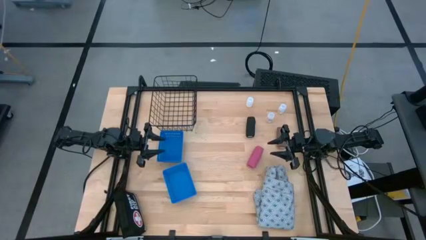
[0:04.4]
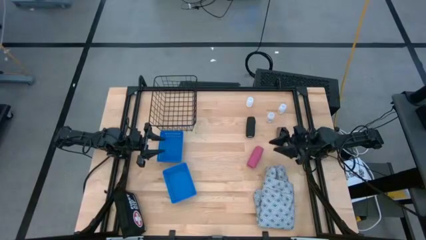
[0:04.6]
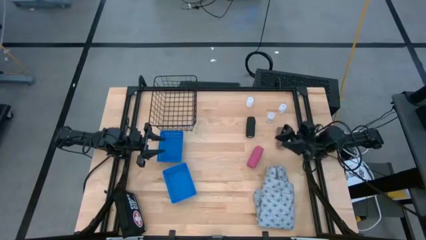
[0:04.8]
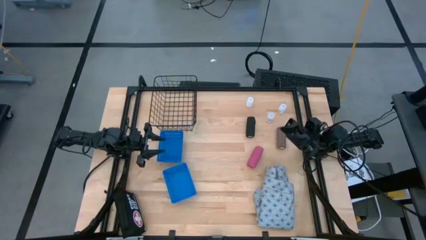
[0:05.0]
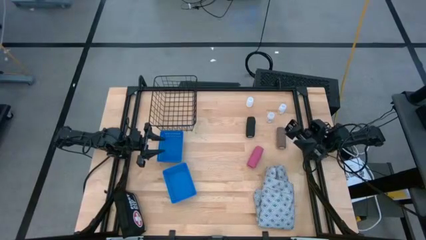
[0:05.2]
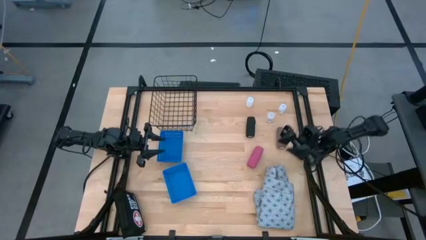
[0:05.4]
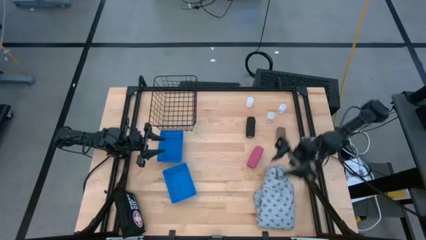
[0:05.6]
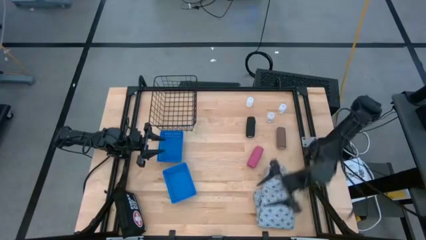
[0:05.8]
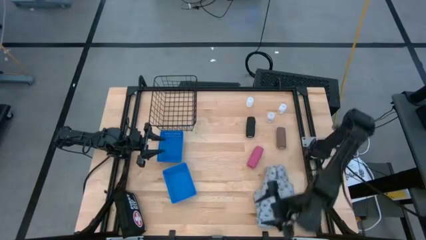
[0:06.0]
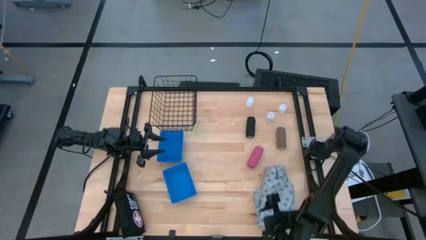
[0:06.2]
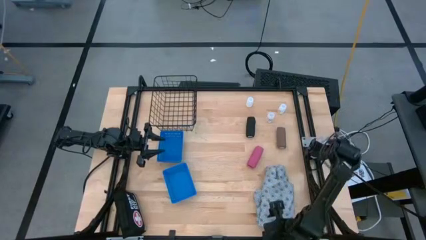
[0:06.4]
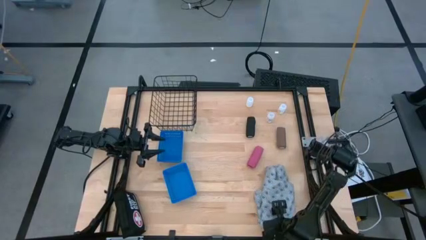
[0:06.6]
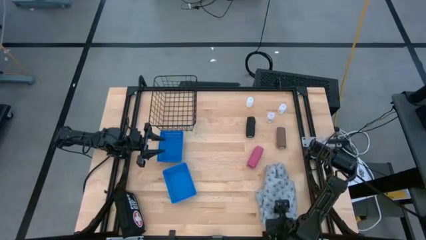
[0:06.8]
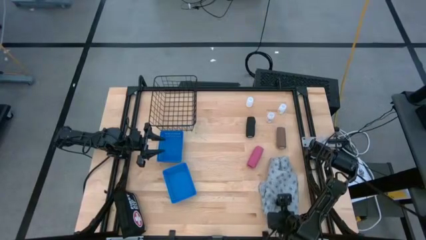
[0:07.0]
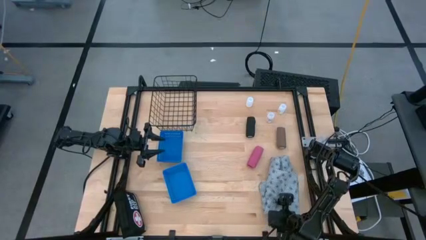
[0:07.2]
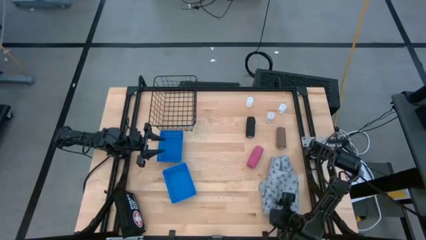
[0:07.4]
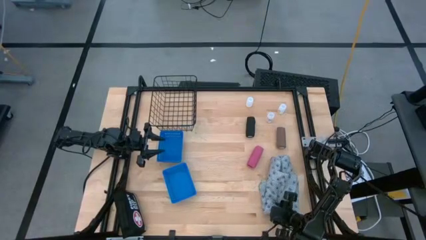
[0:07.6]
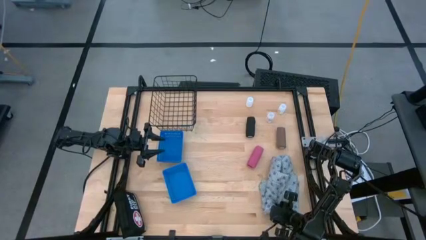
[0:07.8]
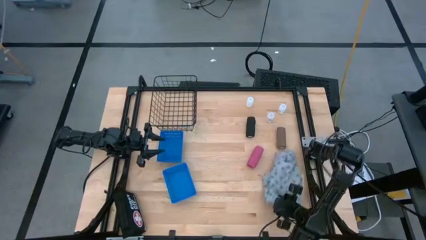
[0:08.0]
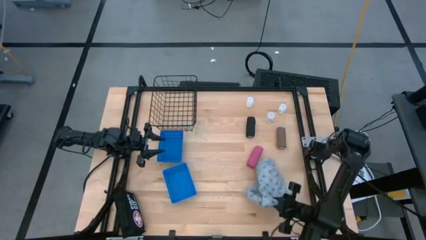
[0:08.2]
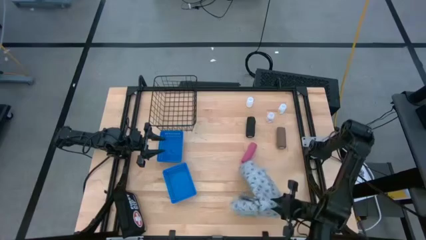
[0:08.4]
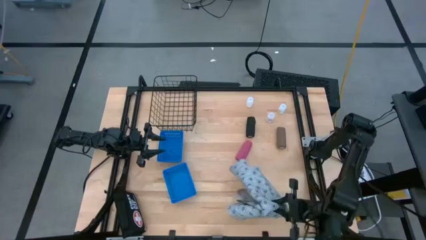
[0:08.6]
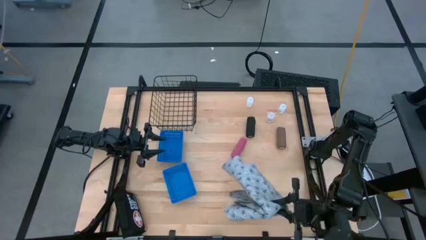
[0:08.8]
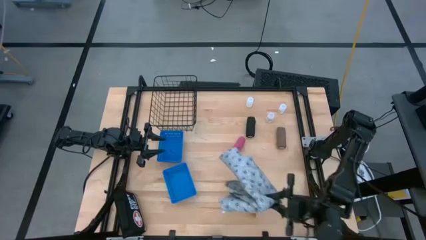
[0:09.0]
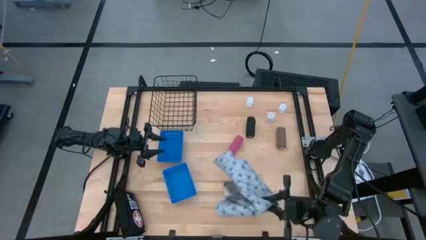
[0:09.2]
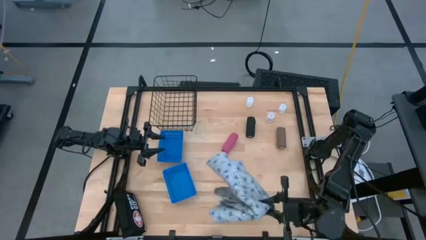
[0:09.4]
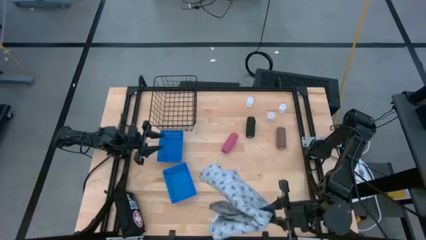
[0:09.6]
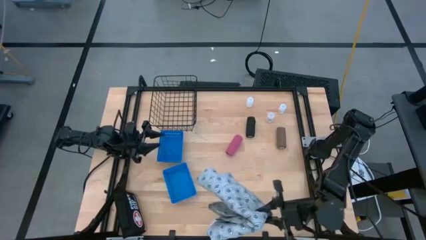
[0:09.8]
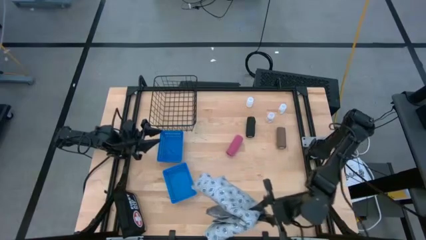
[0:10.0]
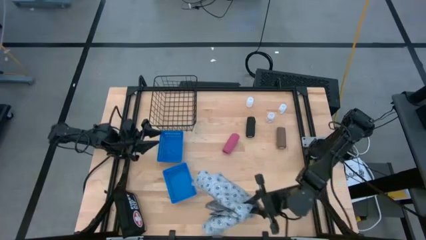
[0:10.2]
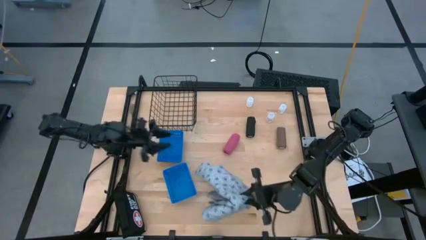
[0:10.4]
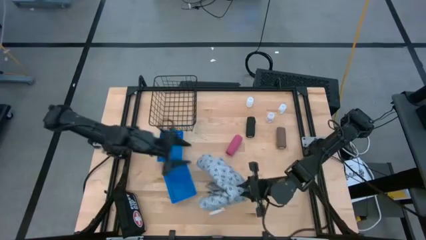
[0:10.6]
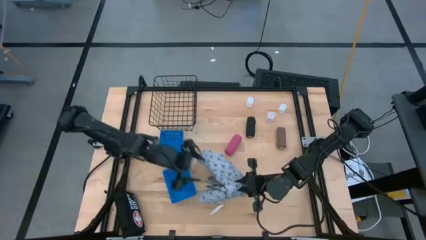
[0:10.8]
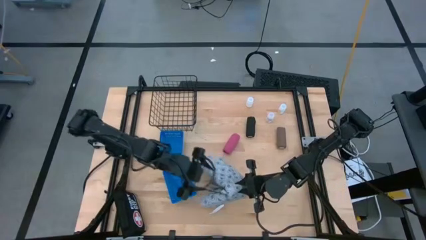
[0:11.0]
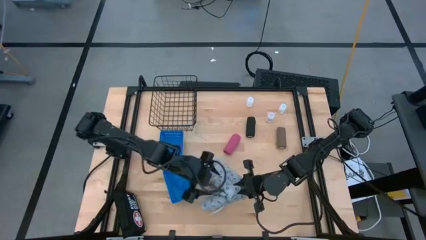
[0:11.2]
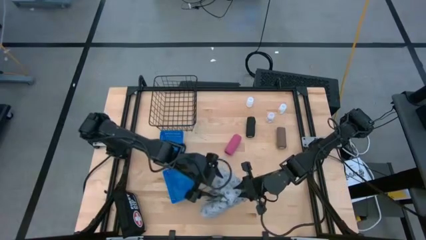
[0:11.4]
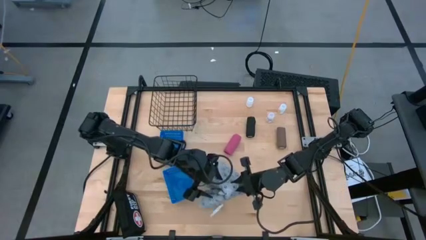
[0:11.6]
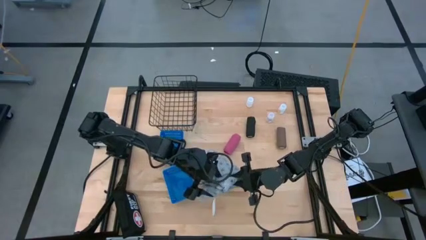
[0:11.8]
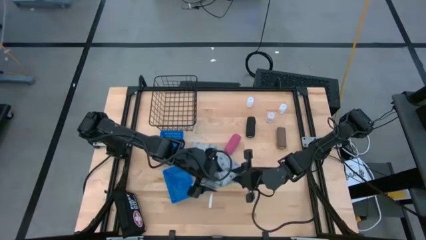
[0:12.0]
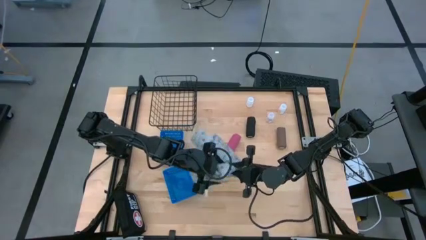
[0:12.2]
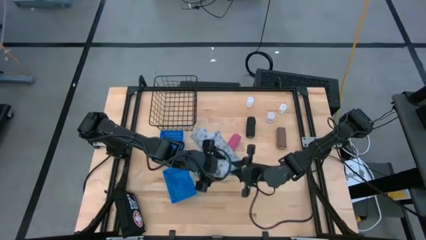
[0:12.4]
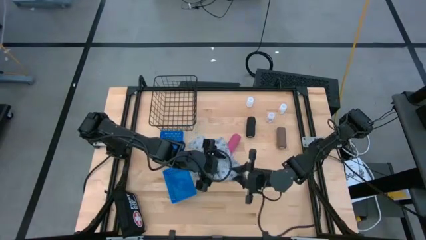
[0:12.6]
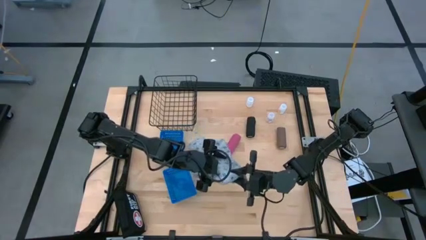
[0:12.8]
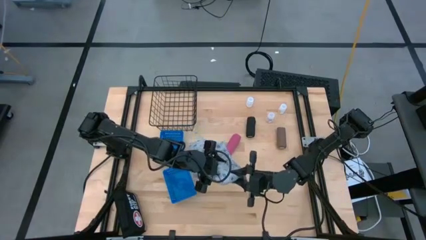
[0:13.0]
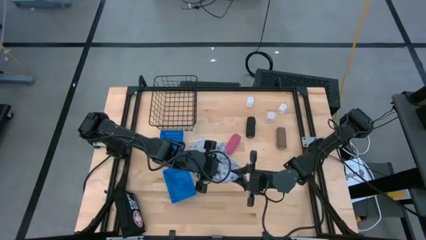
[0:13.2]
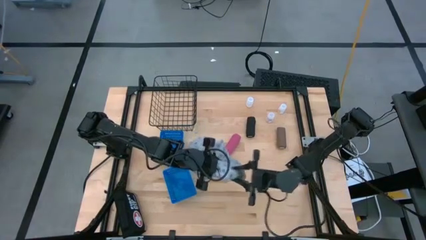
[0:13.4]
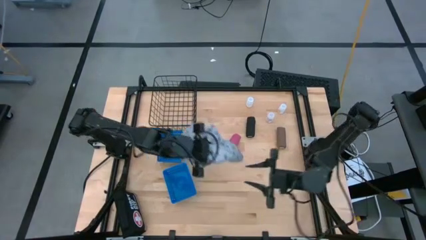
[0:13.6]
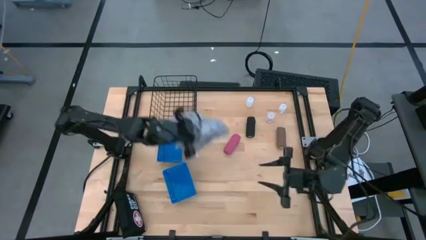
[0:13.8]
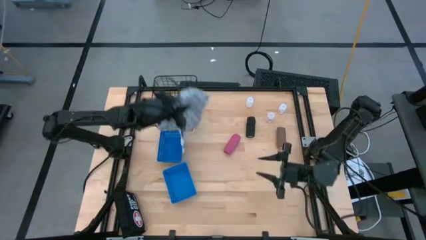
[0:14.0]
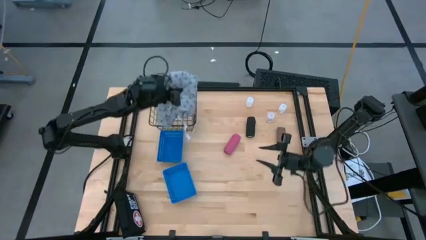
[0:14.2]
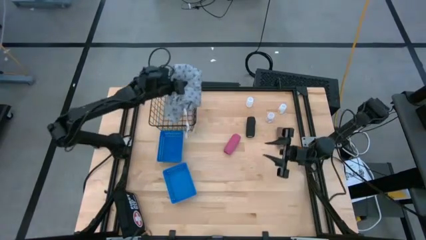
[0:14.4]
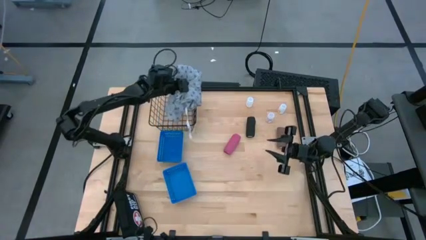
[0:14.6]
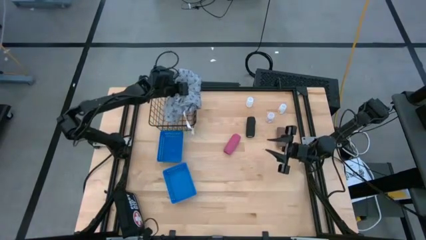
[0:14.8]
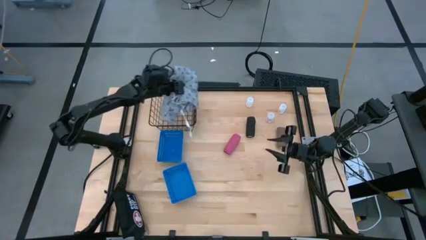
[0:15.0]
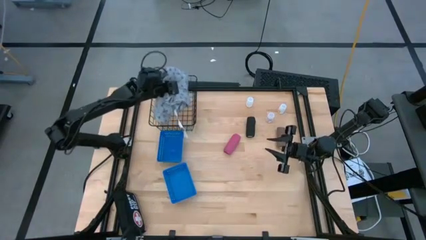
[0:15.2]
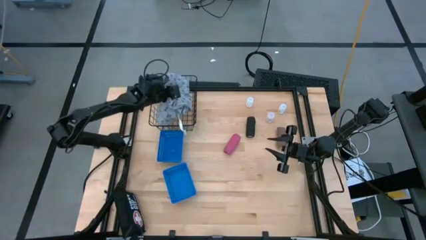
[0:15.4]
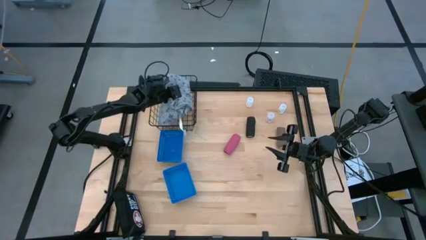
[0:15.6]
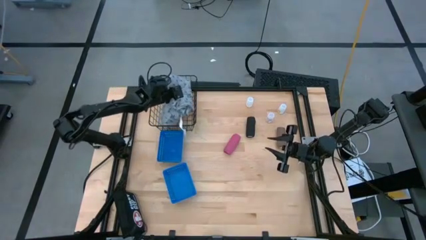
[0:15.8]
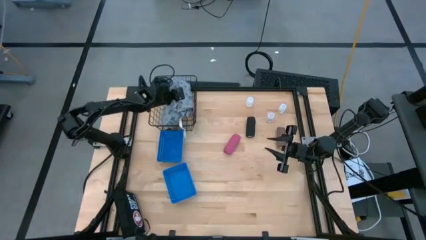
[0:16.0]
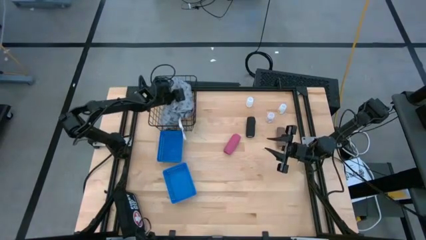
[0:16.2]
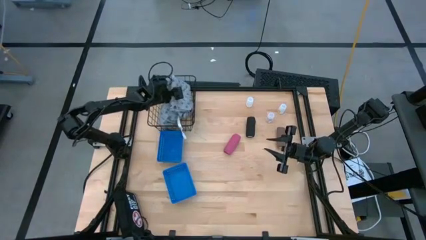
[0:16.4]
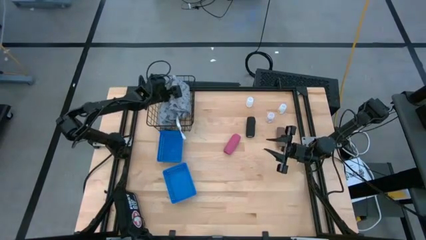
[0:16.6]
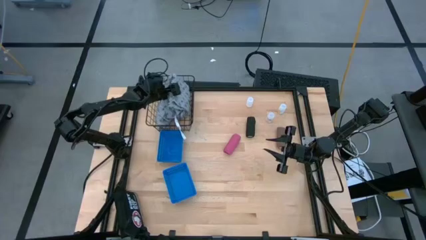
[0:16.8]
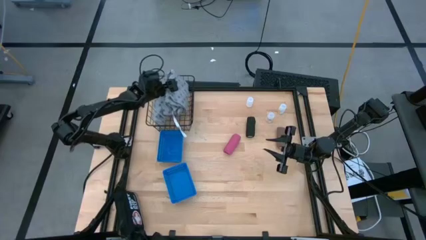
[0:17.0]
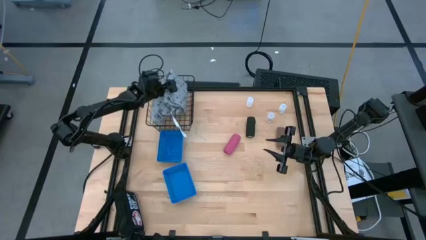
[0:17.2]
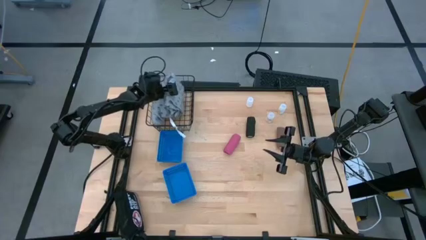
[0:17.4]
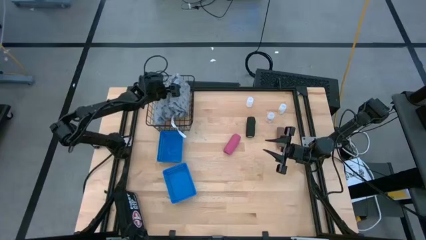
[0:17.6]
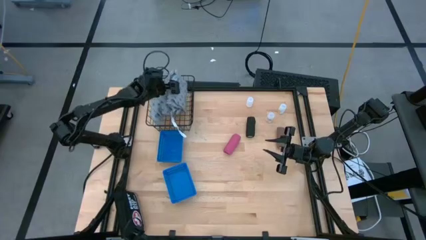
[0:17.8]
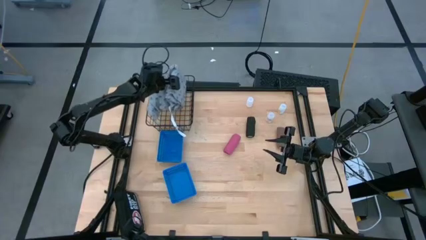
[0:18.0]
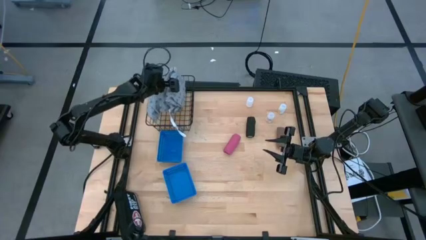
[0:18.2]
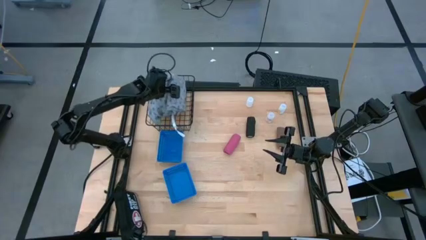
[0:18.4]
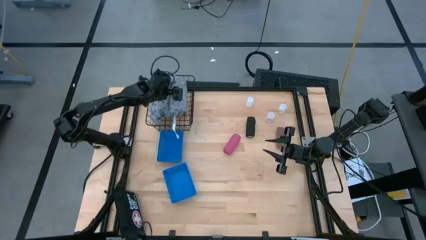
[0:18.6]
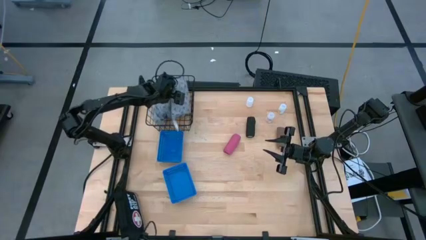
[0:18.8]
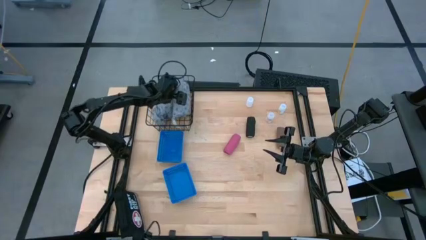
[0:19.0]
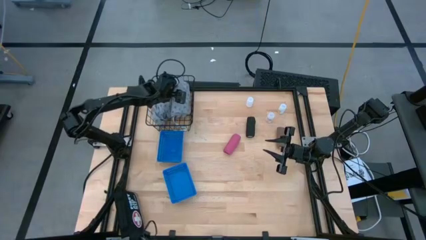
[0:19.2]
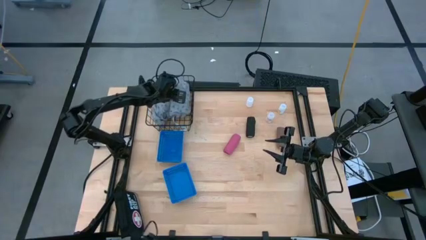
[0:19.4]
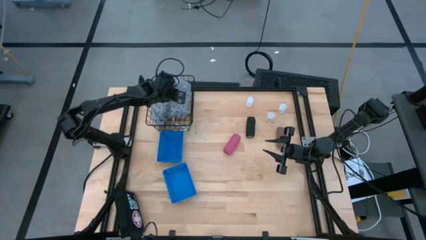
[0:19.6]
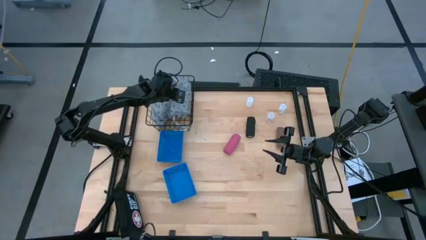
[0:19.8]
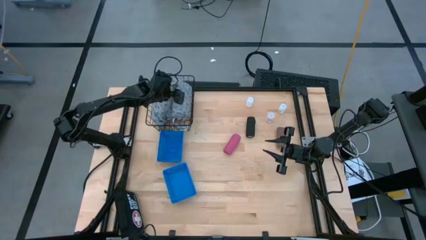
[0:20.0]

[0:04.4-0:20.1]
Task: Pick & Place Medicine items
Put the folded gray gown into the wire basket
